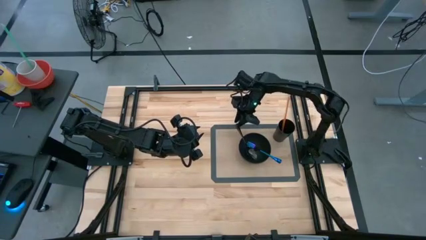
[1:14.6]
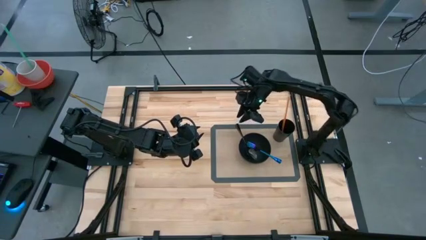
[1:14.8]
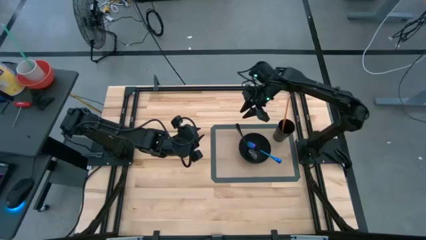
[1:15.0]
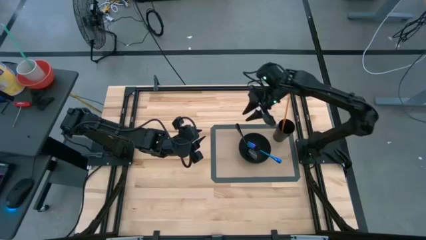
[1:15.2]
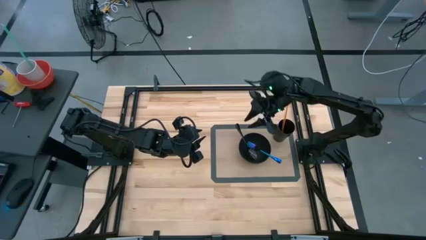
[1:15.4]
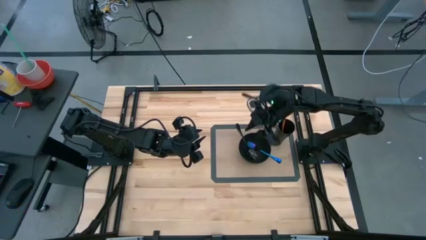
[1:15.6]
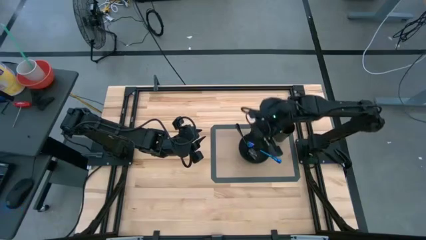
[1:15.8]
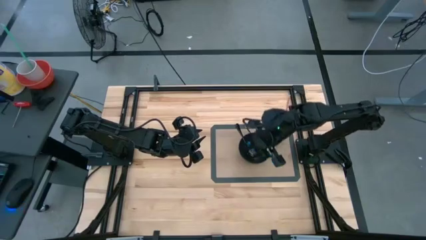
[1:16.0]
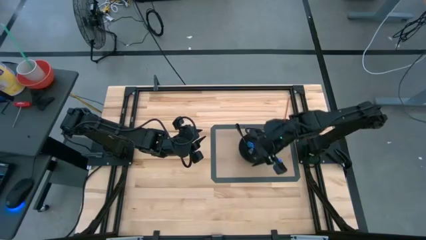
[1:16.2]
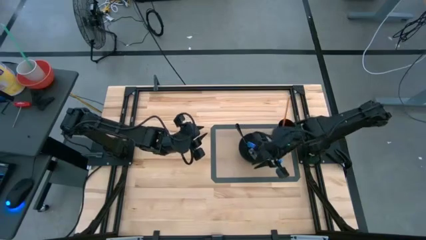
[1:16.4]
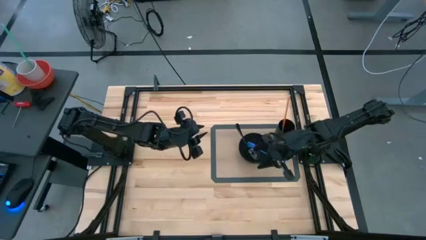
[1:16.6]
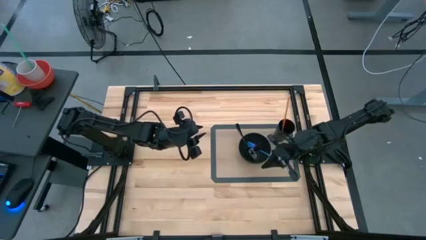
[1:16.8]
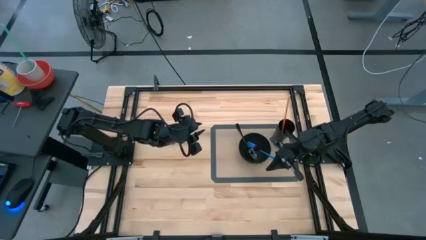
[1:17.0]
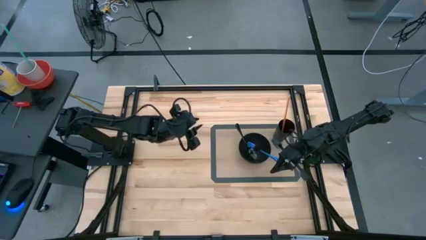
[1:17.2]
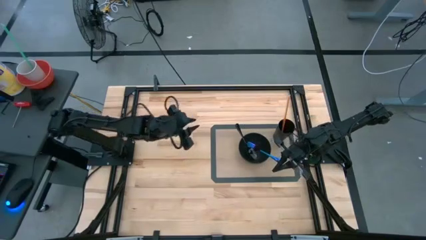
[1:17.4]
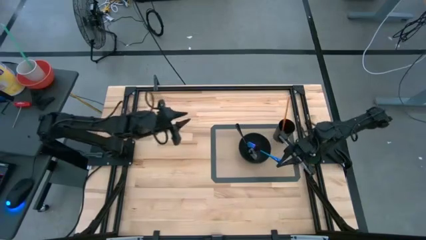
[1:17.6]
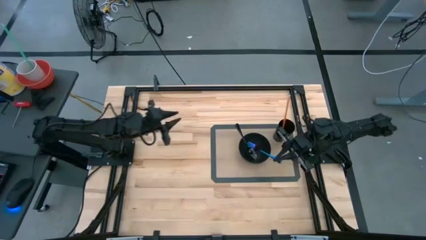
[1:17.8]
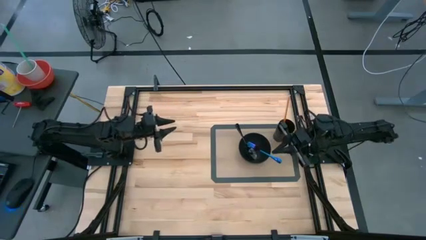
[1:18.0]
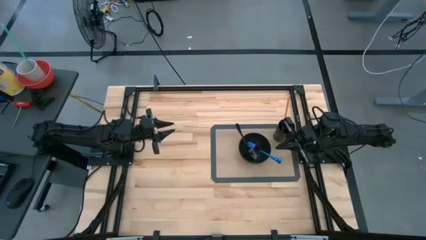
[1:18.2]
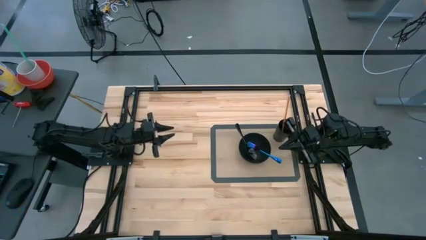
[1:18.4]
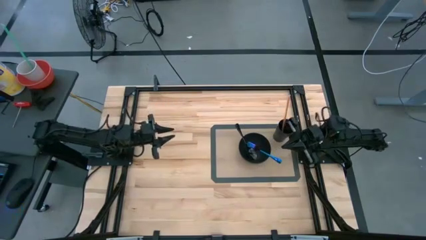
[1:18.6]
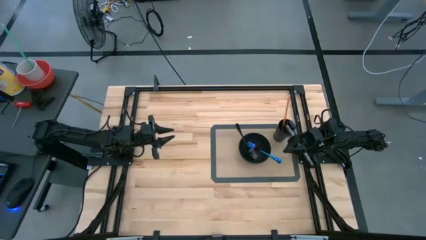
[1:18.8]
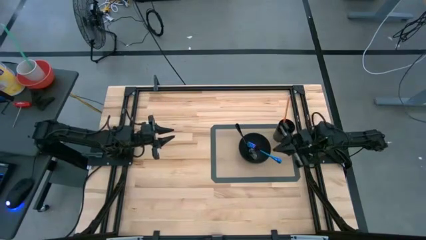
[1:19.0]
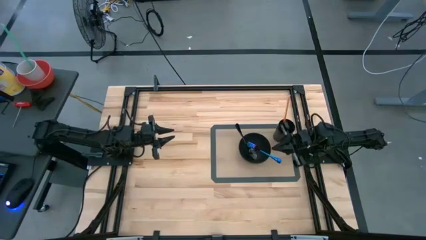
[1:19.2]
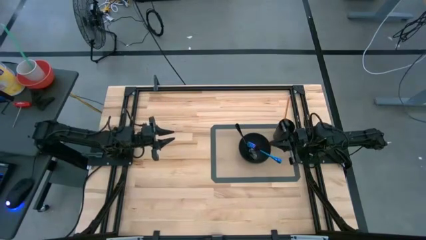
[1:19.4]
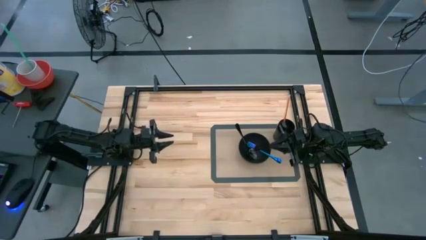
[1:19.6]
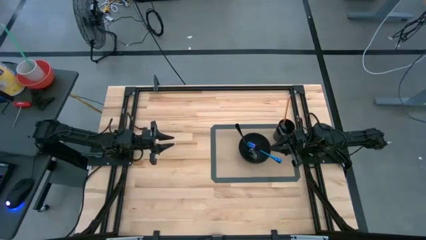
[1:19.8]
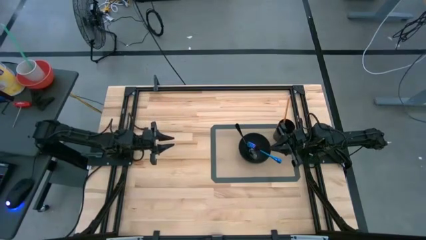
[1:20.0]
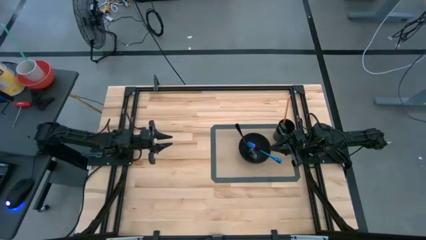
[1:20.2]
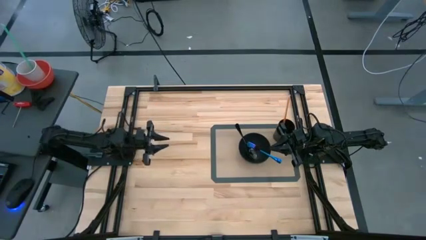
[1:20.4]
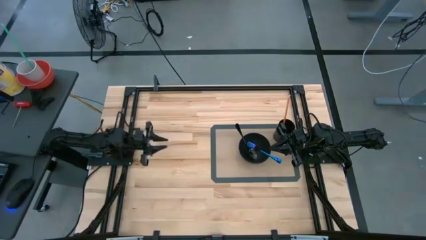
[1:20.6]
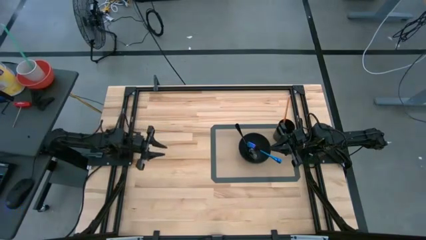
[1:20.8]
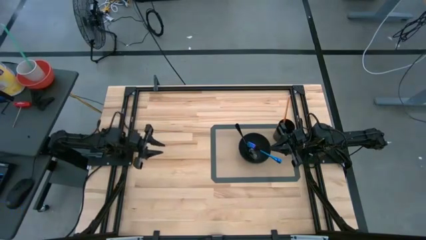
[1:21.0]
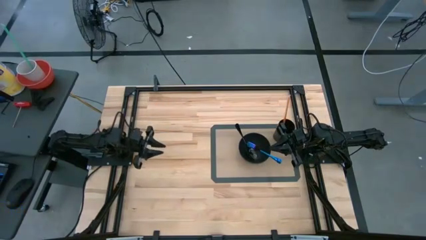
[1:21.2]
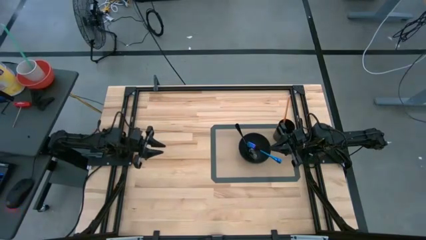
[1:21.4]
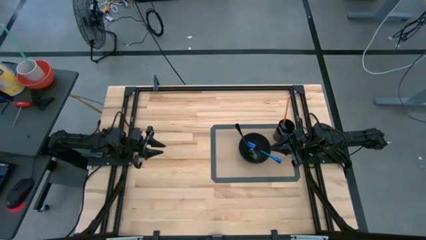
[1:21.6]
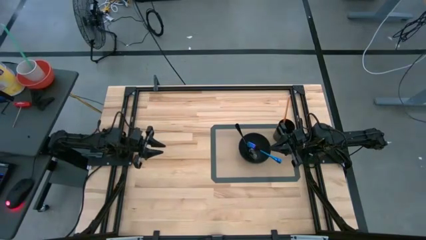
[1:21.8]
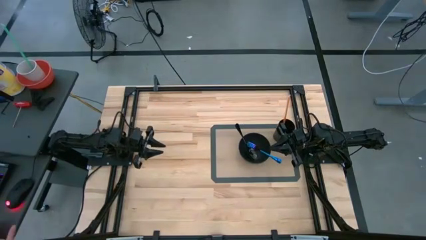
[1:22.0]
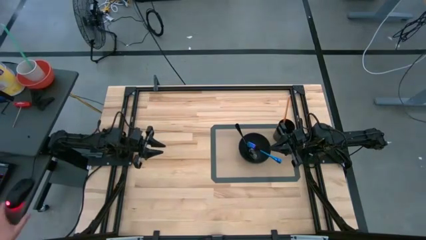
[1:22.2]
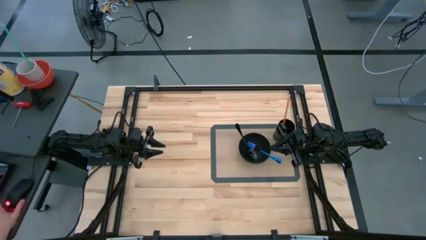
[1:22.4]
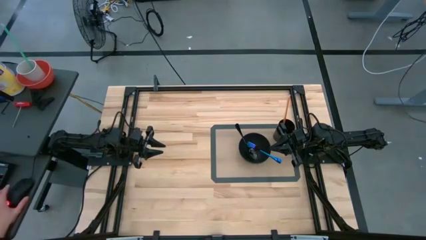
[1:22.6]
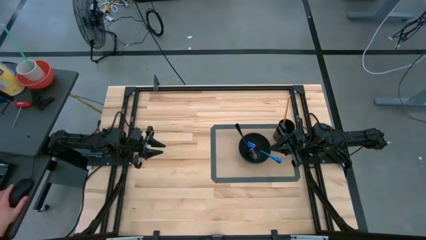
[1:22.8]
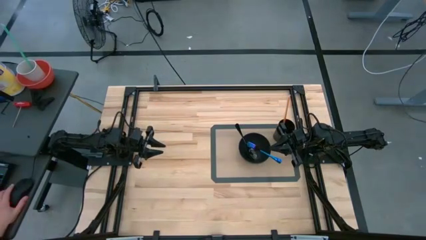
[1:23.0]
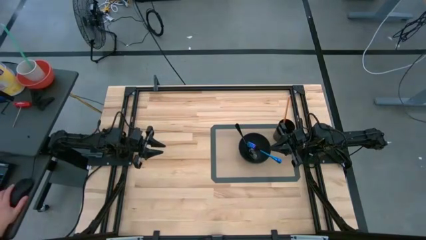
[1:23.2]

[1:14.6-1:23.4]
Task: Pick & Place Utensil
Return to Home Position

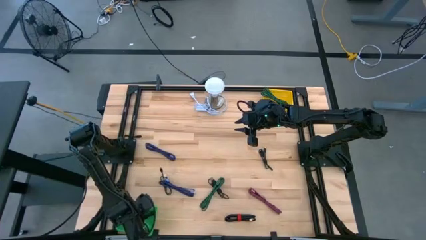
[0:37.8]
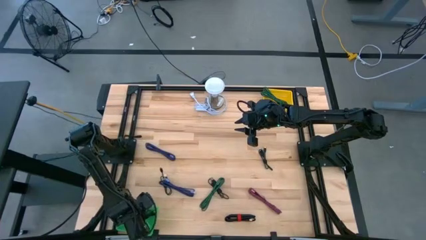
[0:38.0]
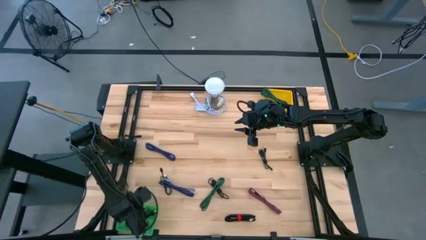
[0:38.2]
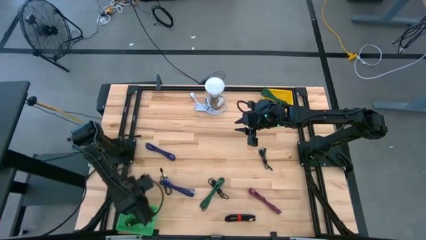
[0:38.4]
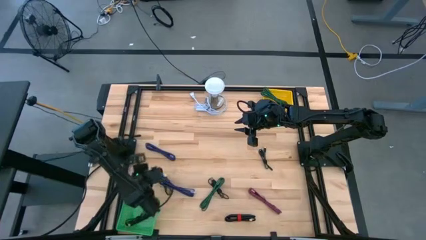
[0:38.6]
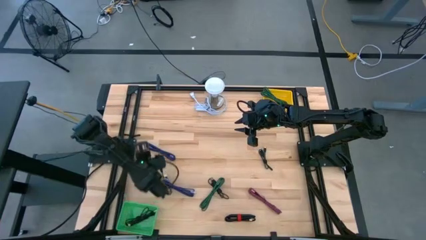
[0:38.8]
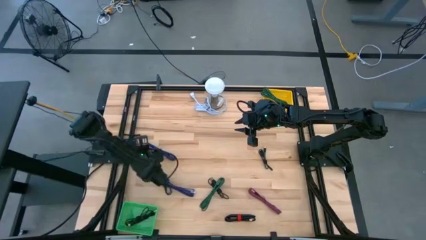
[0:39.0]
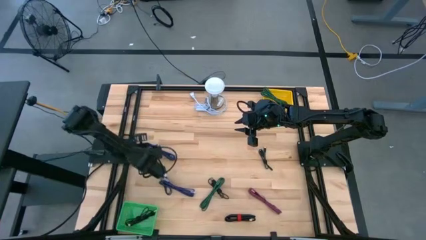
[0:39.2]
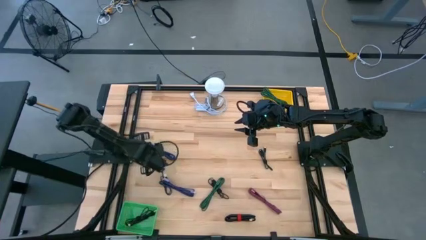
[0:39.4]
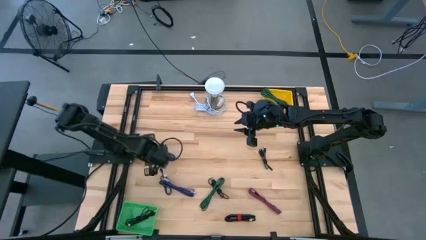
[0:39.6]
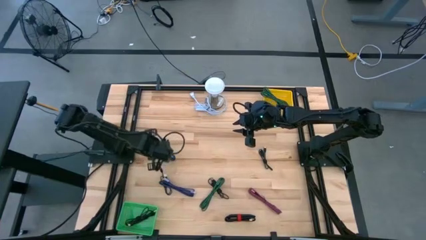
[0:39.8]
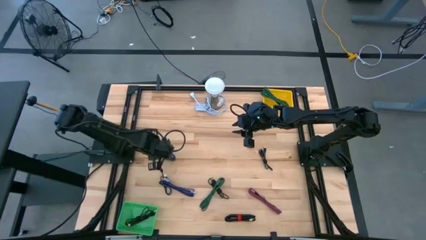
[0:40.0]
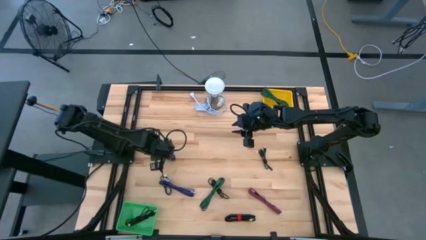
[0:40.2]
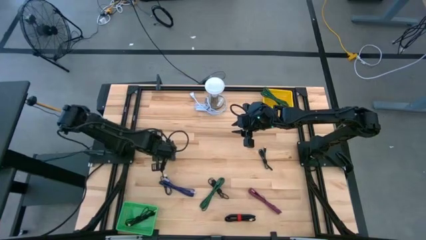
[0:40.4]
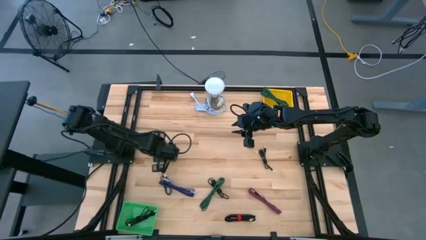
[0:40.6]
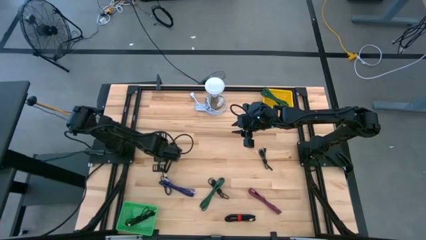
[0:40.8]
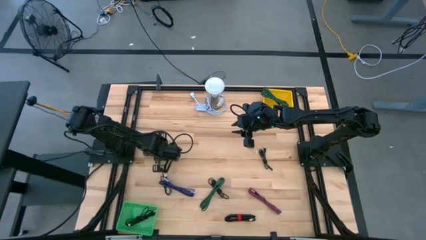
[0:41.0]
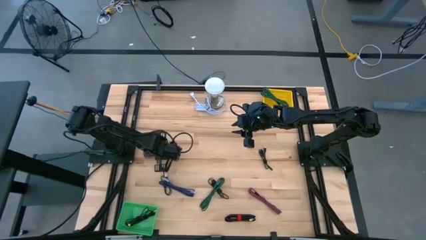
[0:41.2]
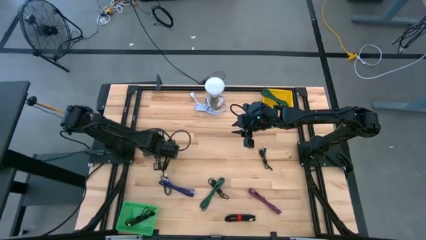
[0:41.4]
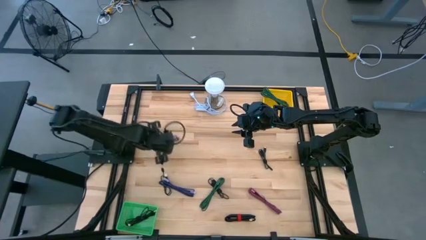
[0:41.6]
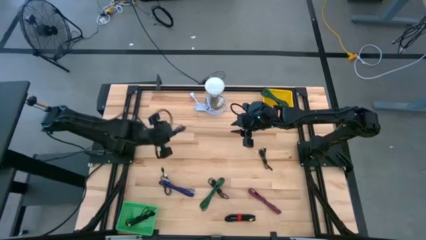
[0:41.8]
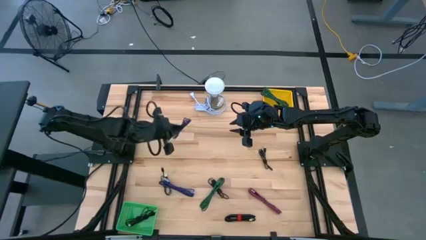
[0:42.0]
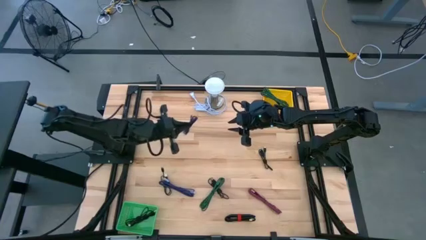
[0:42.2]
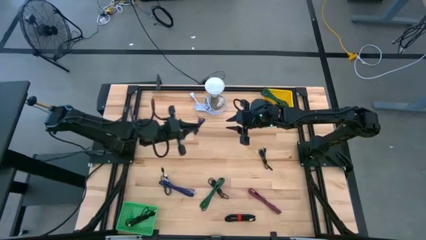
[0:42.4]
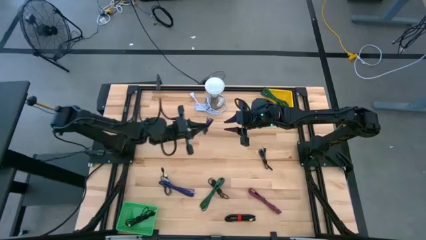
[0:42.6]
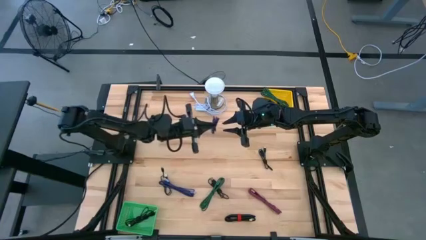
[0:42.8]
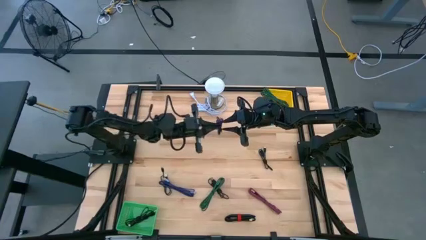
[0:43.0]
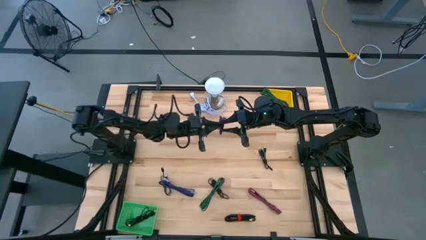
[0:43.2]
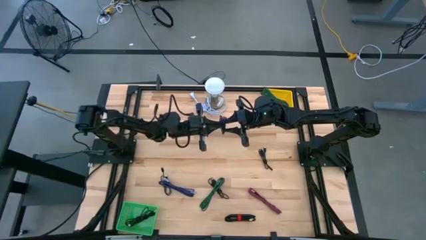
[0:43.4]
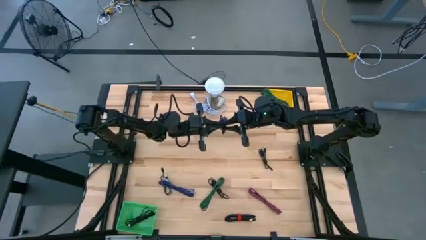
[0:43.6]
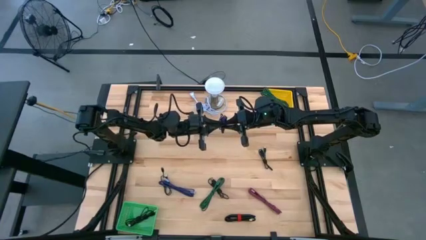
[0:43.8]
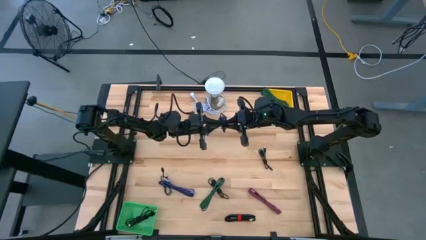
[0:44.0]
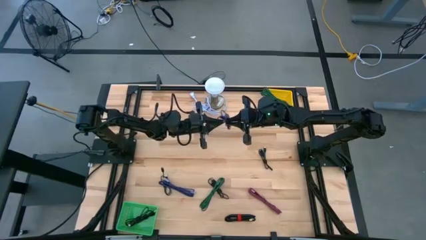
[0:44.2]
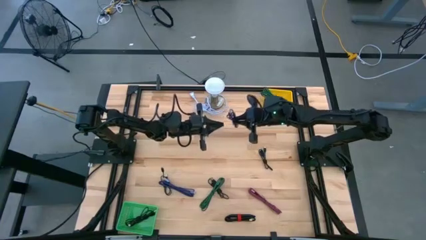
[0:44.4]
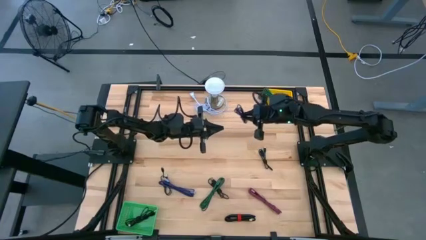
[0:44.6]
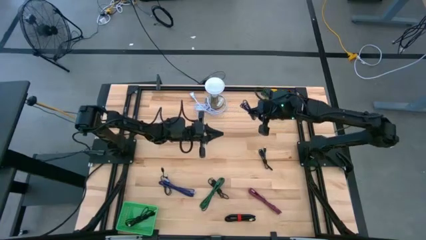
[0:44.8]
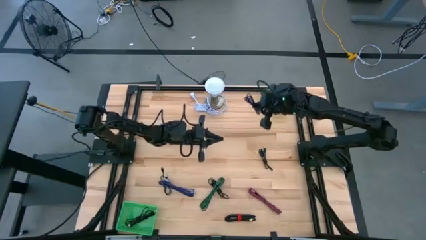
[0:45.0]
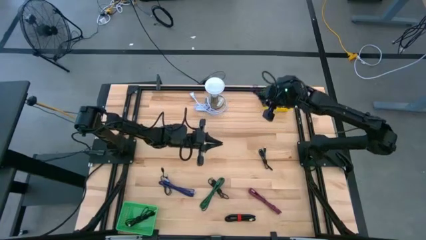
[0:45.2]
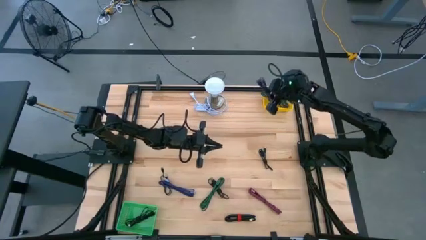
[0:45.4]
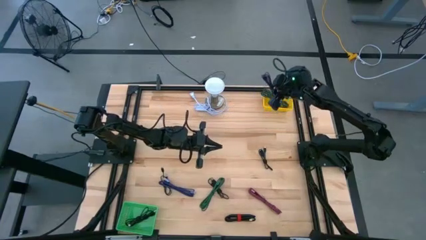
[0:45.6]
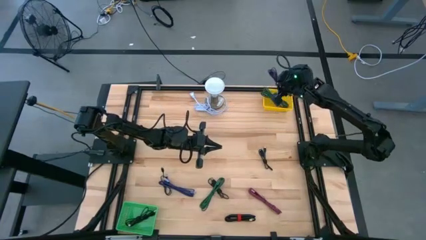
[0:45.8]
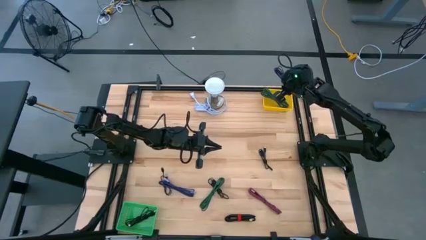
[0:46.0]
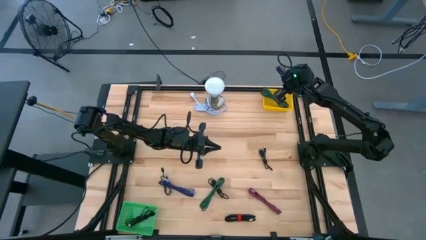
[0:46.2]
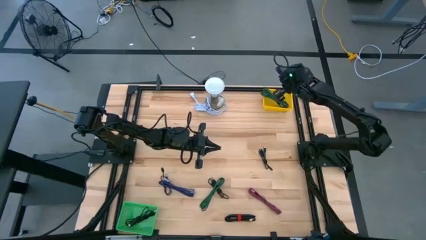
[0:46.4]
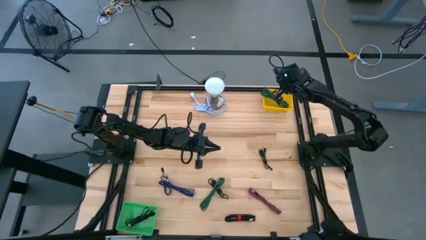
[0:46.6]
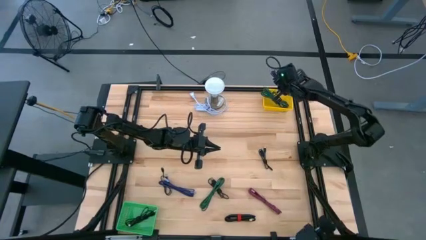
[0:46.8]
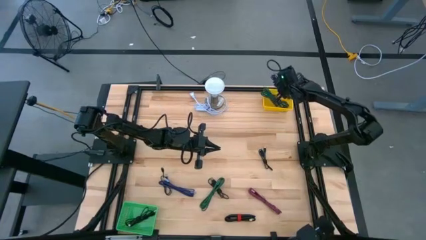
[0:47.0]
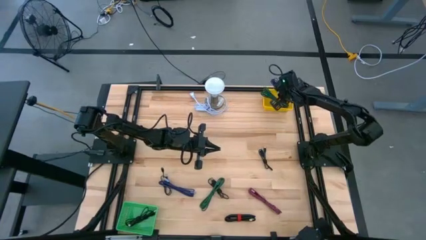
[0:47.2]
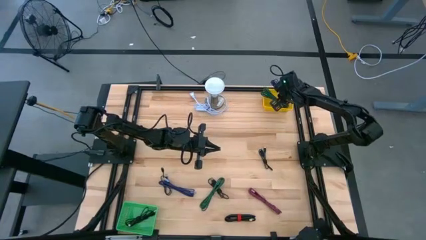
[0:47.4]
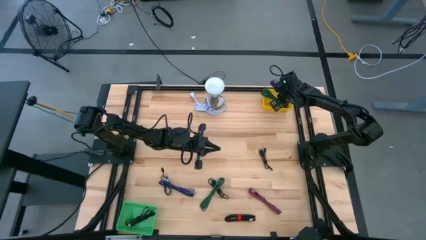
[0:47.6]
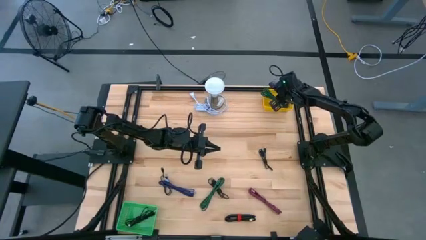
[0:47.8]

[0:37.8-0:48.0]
Task: Pick & Place USB Port
Put the purple USB cable into the yellow bin
